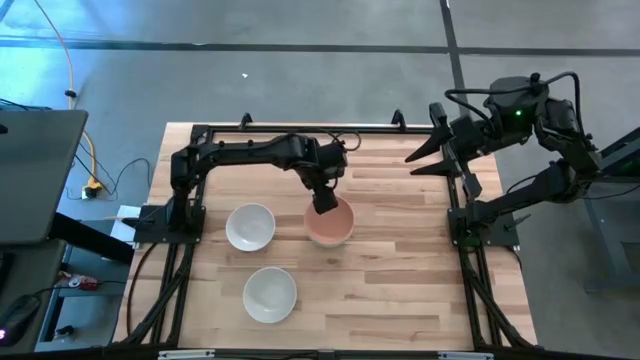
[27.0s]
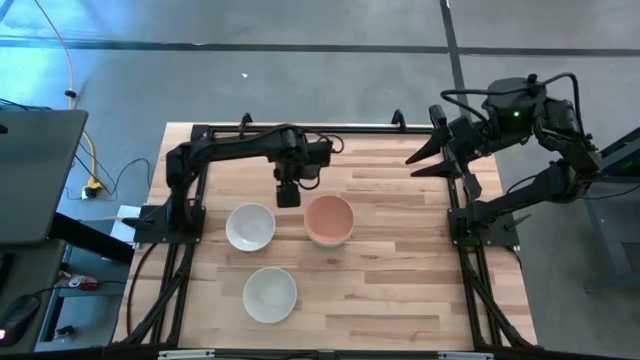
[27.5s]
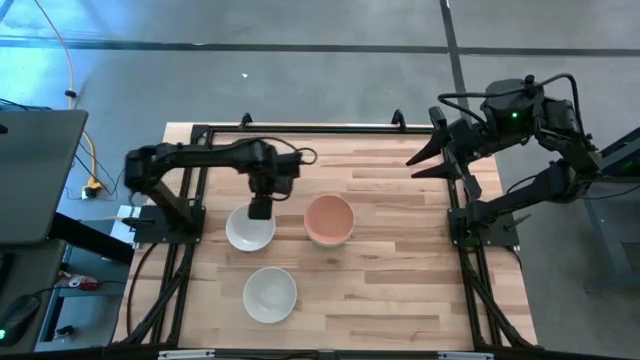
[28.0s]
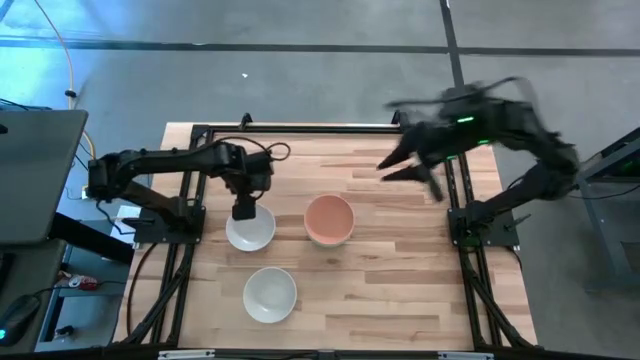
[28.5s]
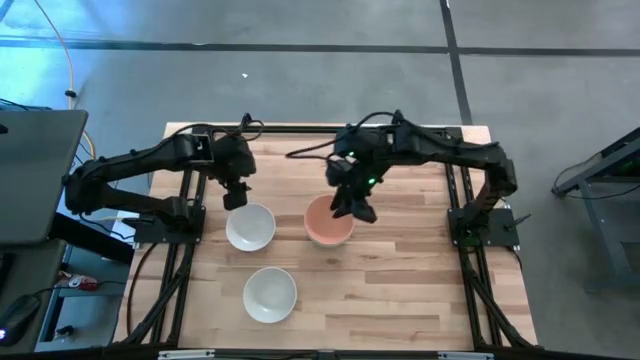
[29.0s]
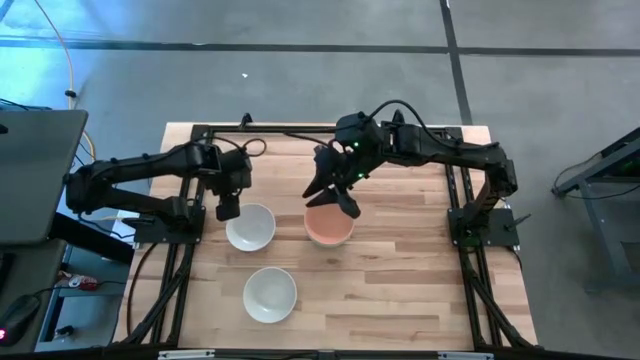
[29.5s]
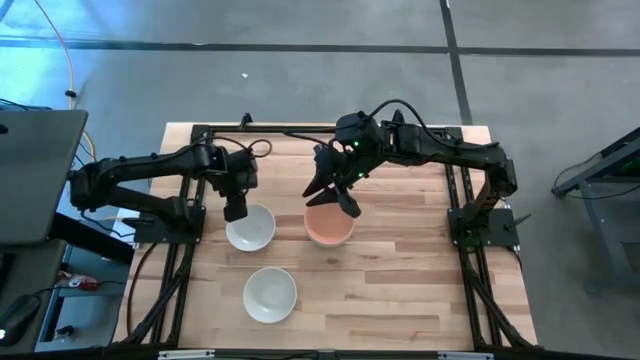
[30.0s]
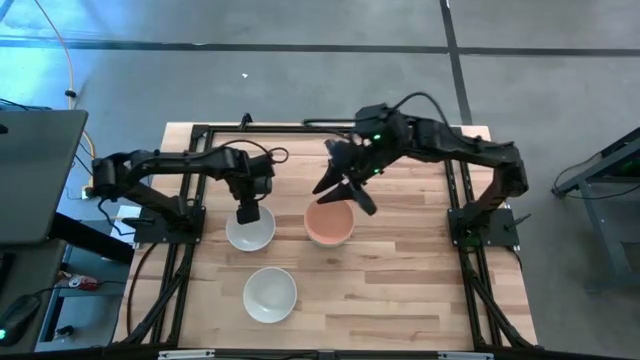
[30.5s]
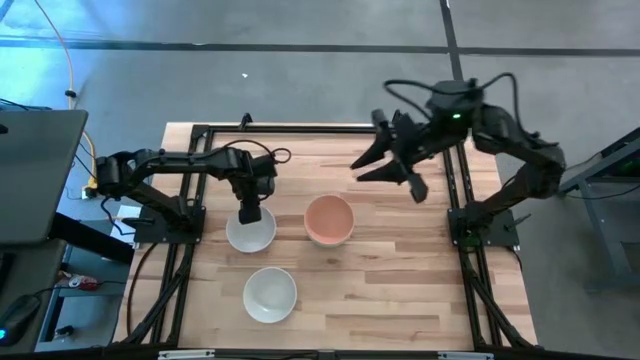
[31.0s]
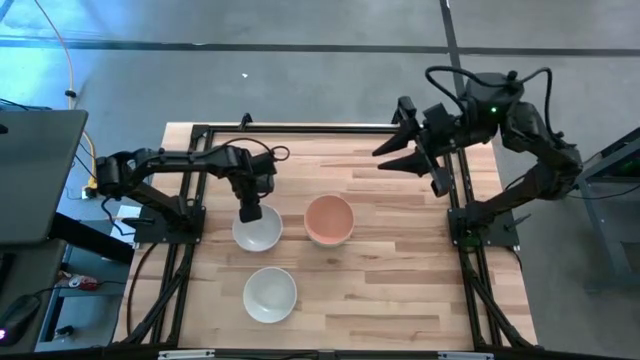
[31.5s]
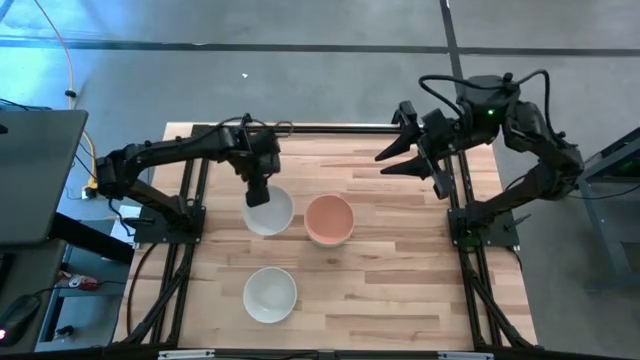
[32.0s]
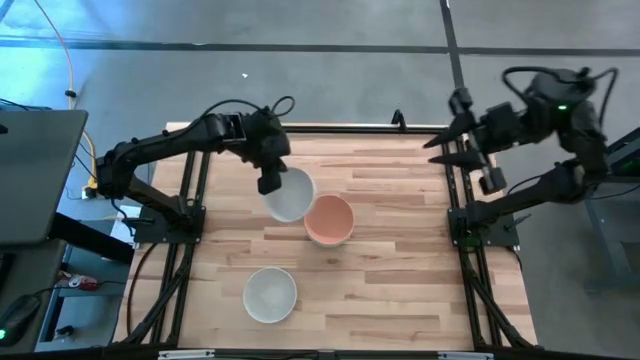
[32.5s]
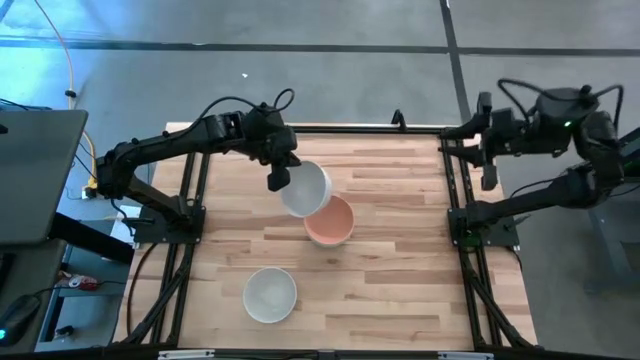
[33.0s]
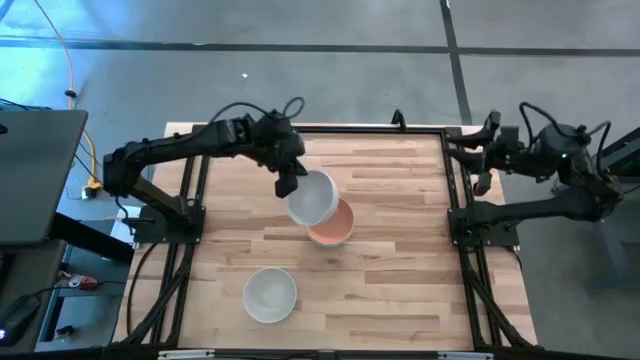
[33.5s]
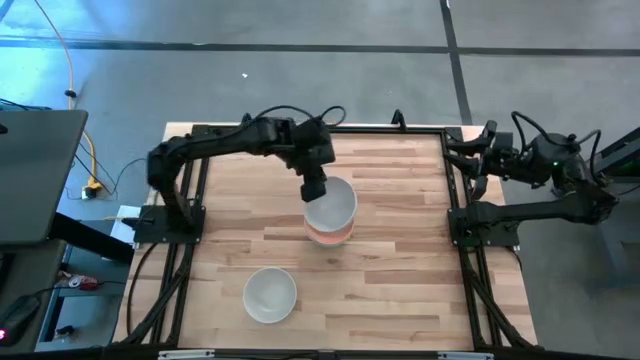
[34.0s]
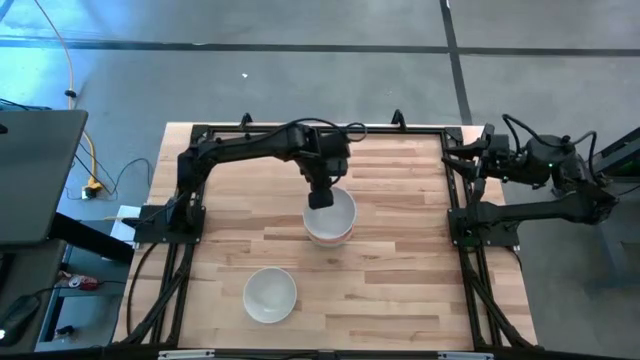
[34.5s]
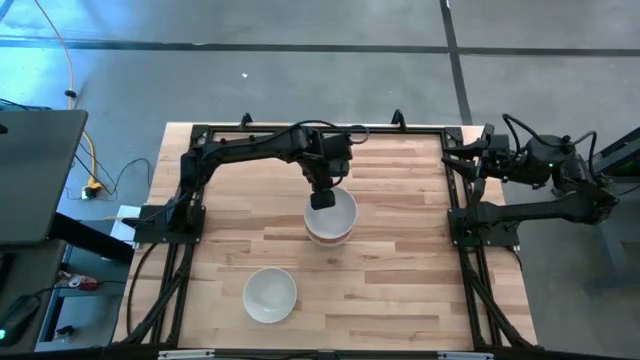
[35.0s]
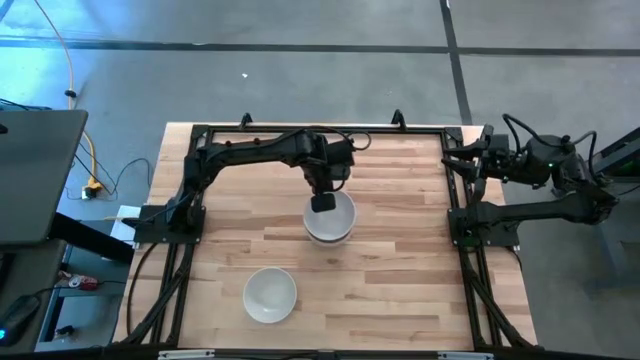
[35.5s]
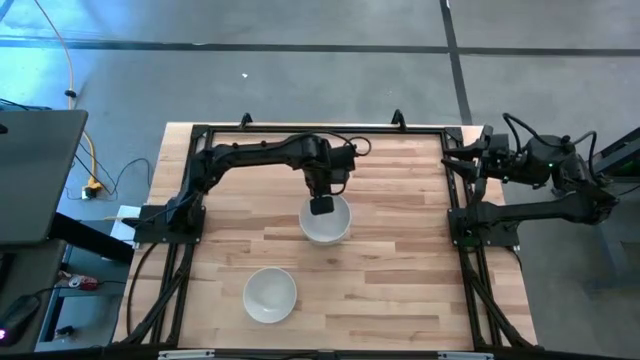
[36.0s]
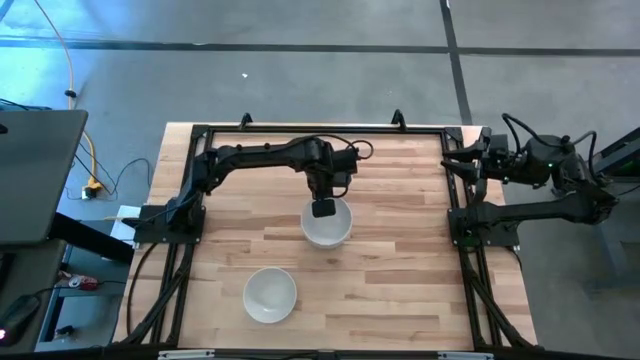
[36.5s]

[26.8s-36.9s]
Task: Nest bowls inside each other
Stack the white bowl on the orange bowl

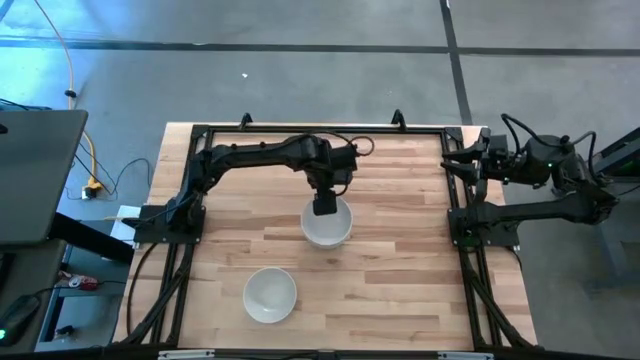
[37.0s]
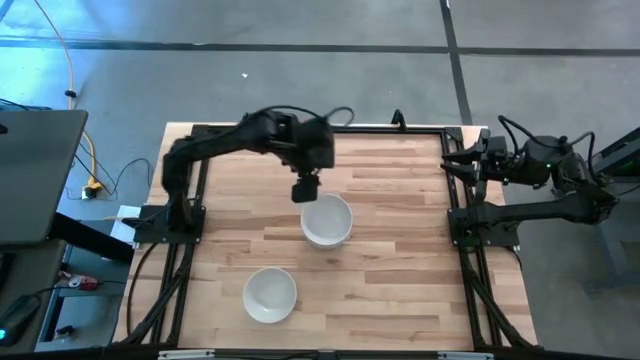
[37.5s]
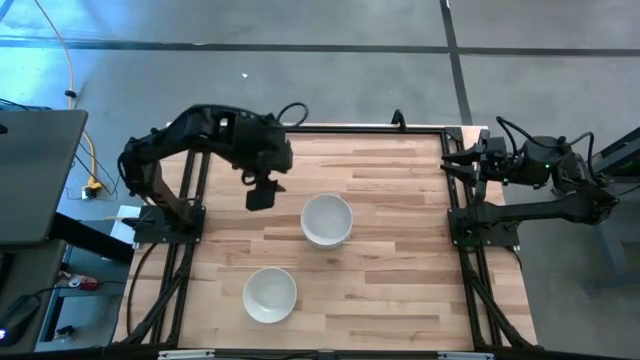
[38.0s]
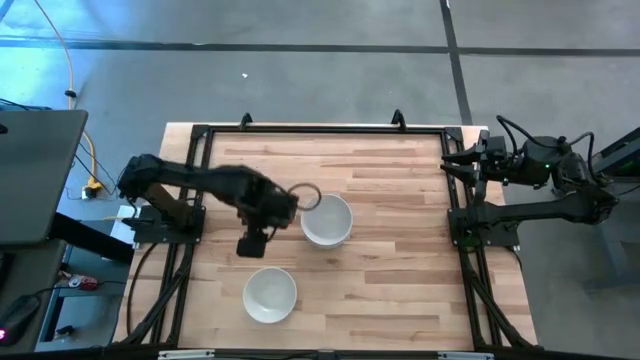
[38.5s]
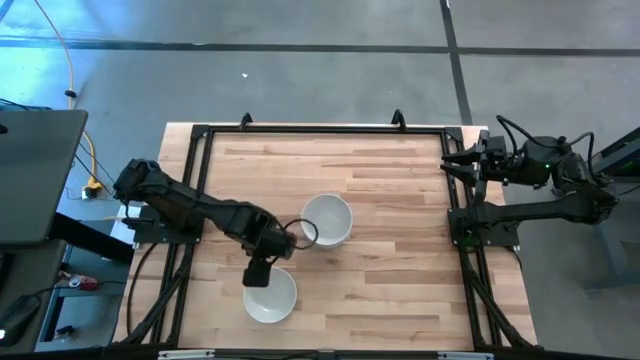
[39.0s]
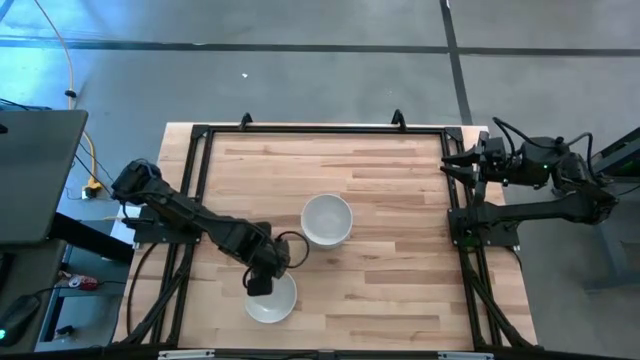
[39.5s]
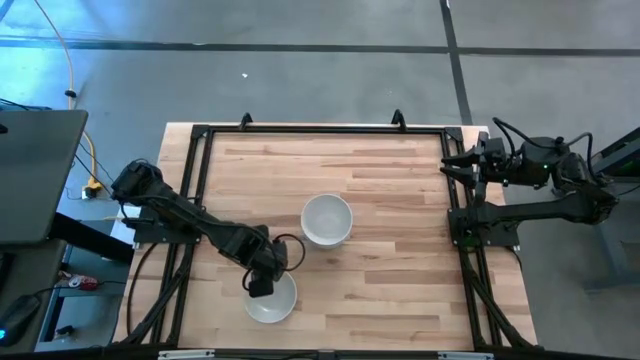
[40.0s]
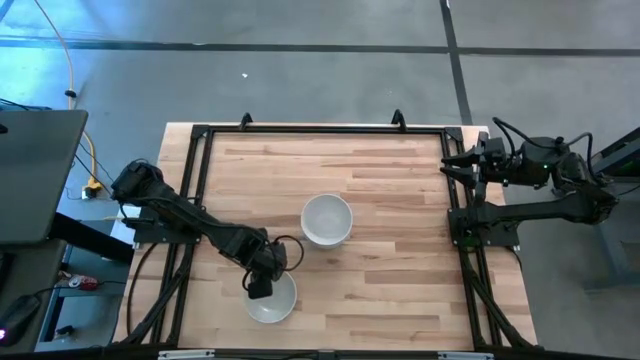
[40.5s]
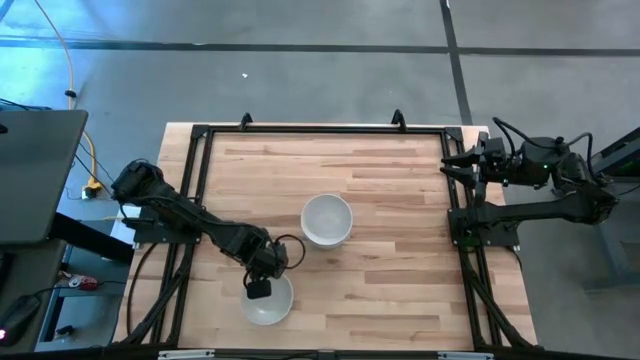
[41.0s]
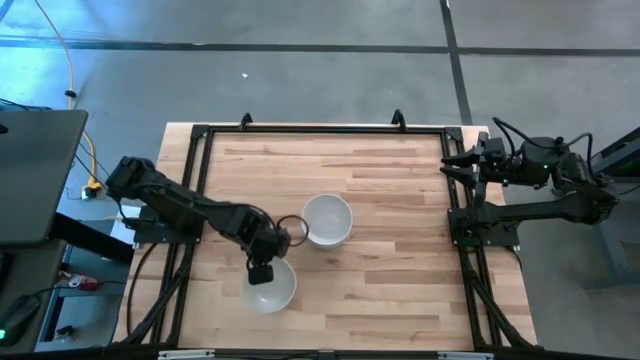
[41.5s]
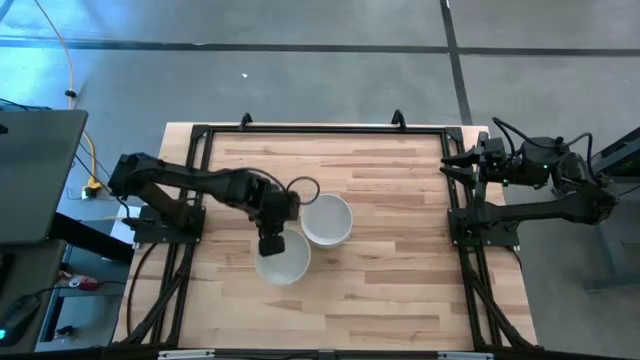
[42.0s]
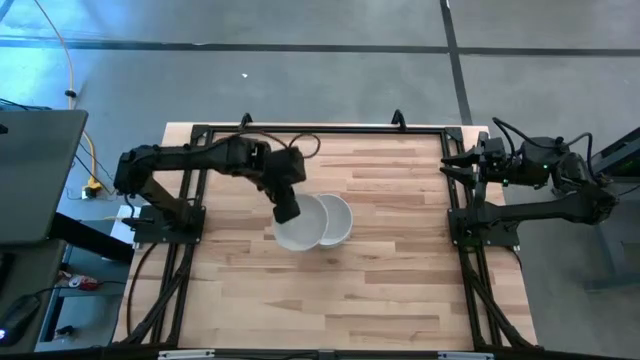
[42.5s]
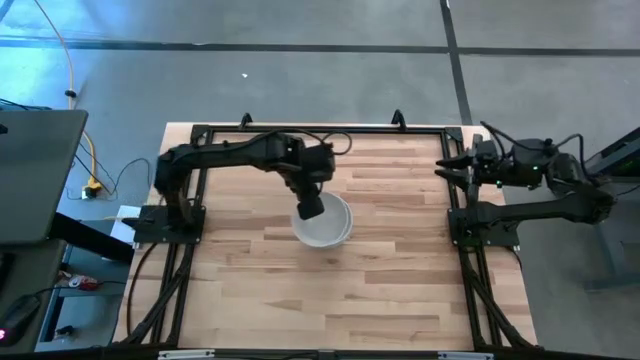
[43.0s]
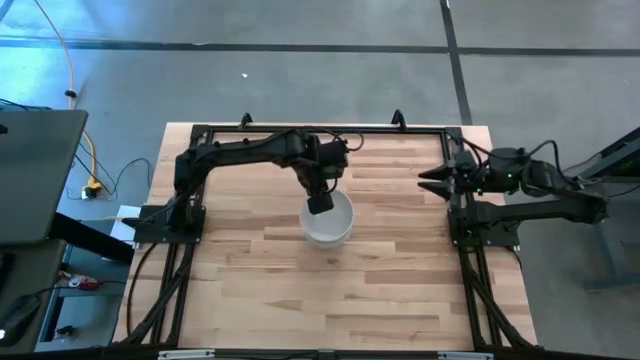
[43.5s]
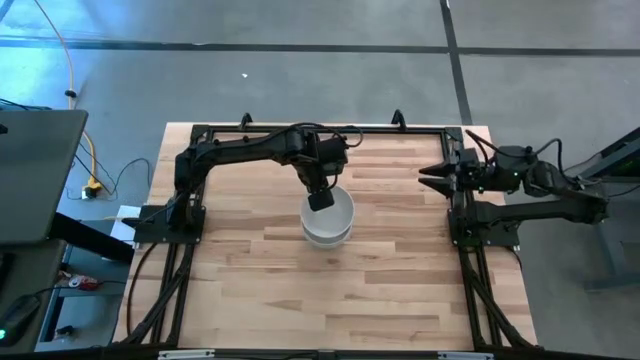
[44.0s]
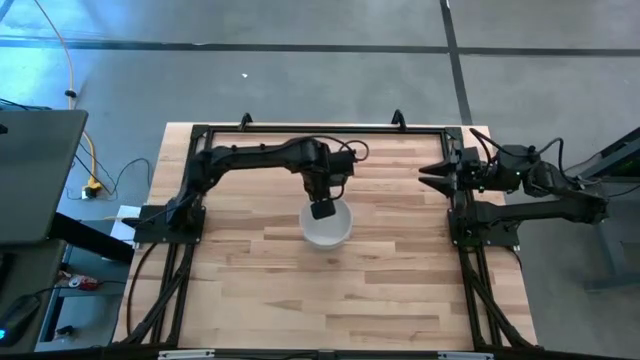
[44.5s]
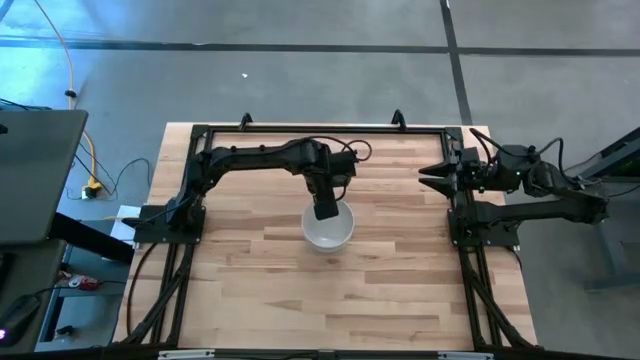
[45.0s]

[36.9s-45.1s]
Stack the white bowl on the white bowl

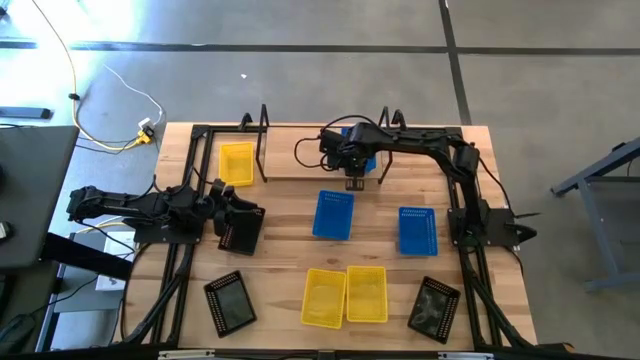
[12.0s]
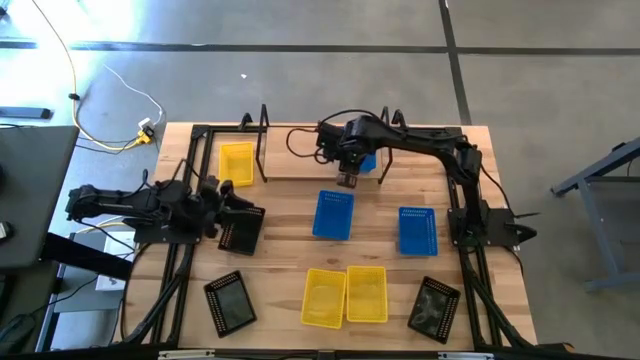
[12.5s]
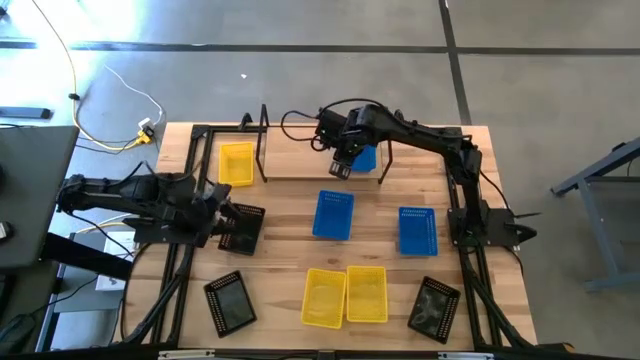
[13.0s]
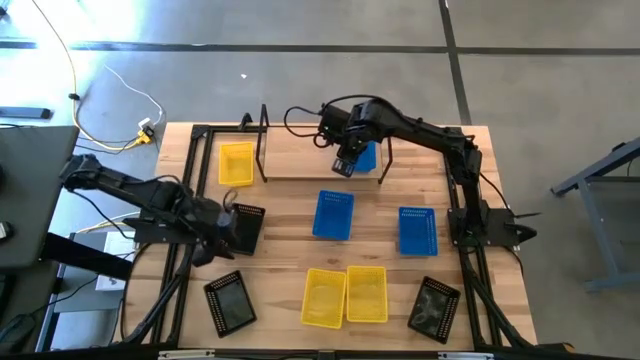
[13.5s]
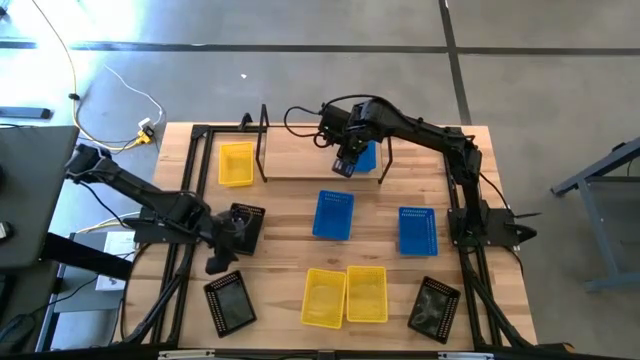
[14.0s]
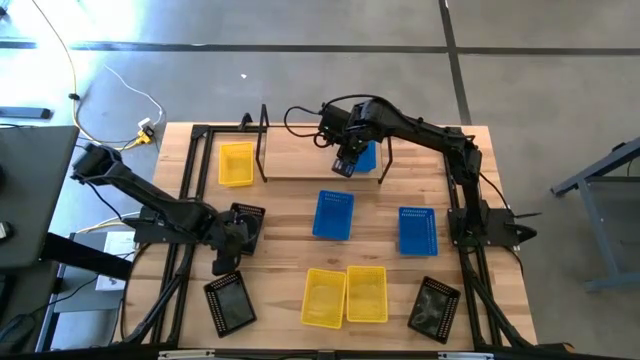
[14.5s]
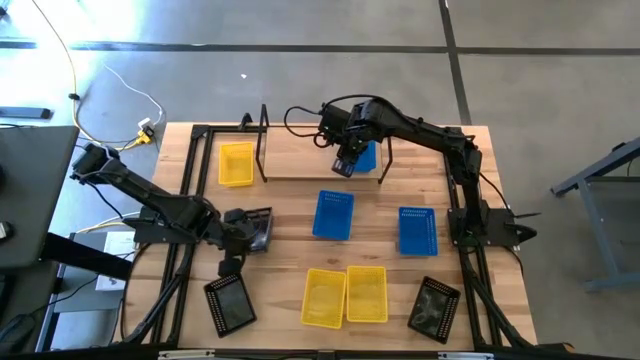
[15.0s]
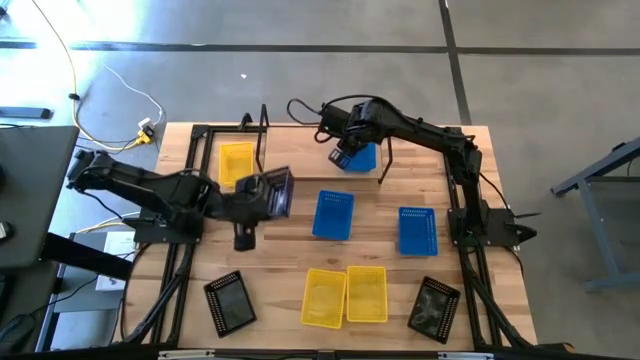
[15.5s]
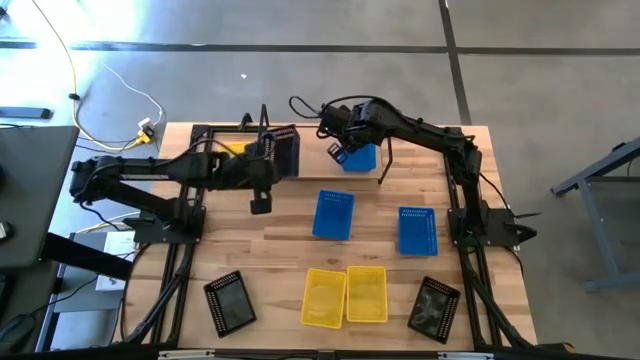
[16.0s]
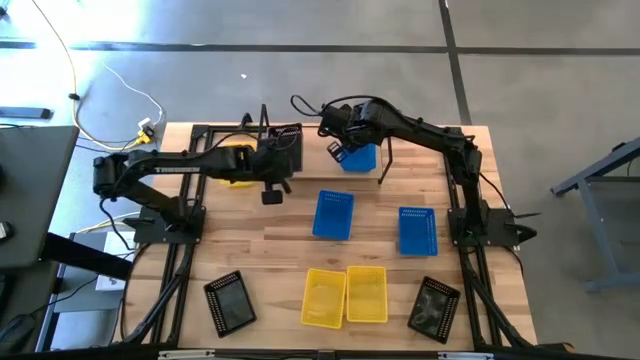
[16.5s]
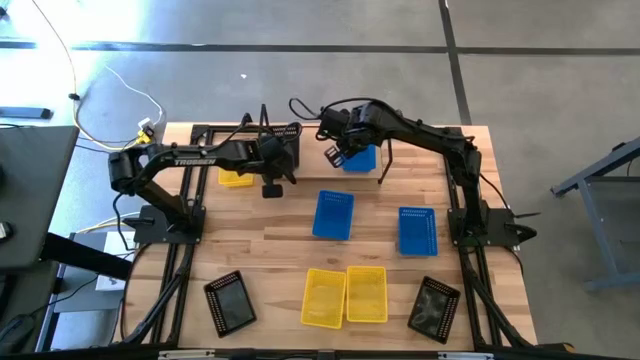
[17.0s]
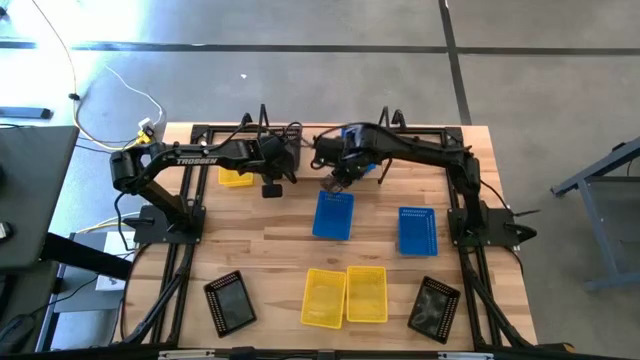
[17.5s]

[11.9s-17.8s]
Task: Stack baskets on shelf by color
Put the top left black bin on the shelf
